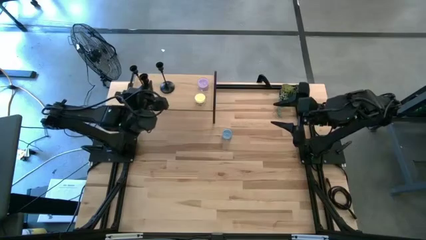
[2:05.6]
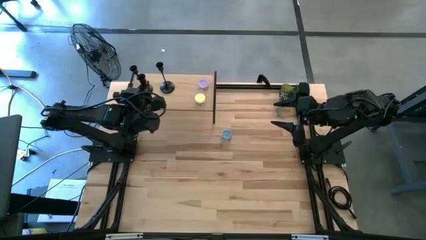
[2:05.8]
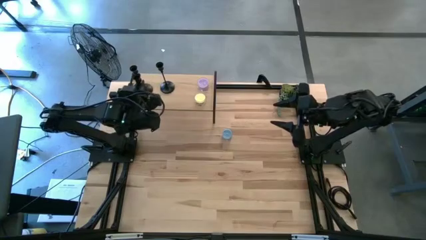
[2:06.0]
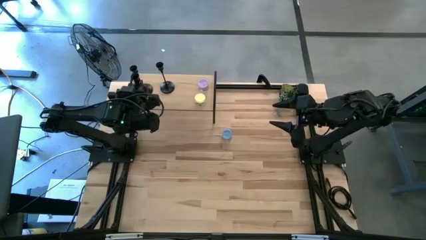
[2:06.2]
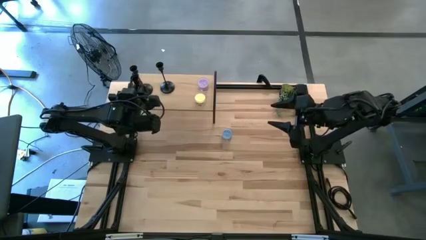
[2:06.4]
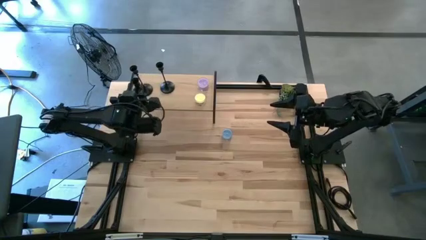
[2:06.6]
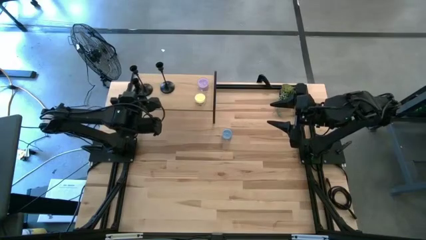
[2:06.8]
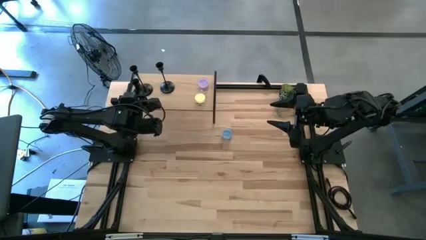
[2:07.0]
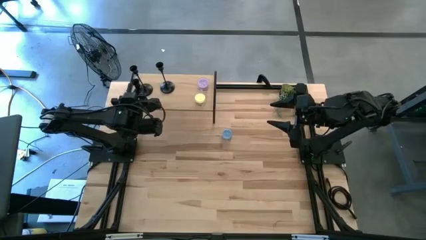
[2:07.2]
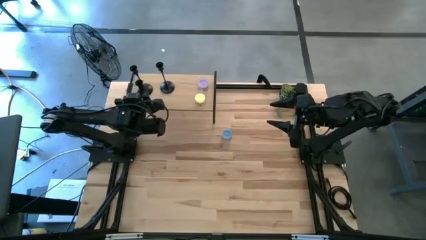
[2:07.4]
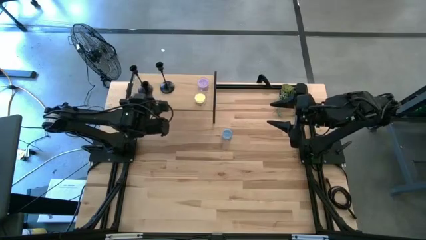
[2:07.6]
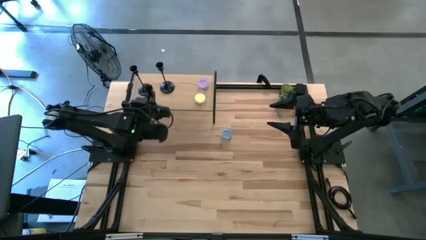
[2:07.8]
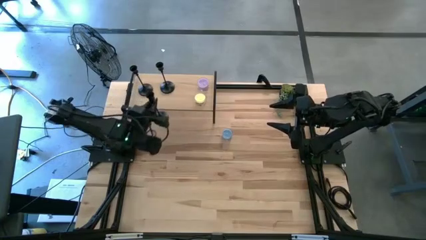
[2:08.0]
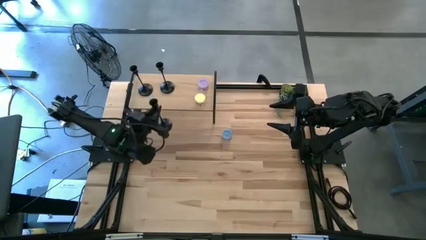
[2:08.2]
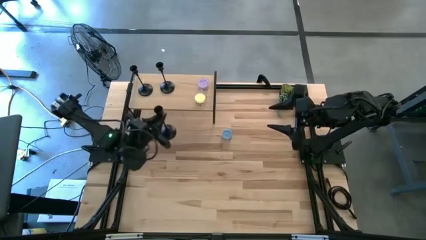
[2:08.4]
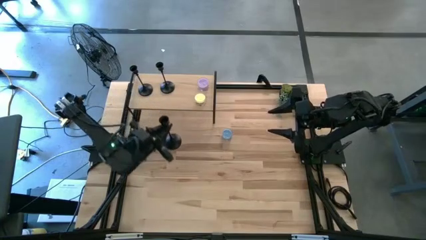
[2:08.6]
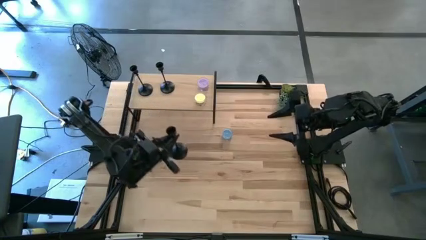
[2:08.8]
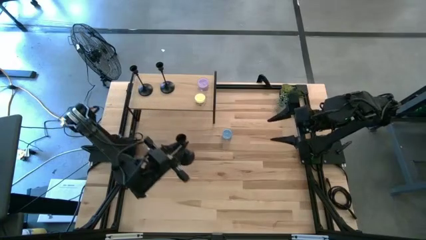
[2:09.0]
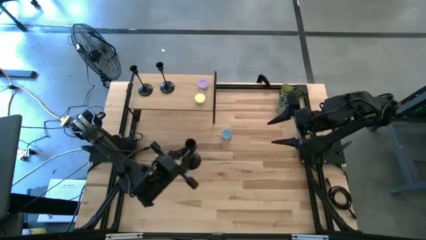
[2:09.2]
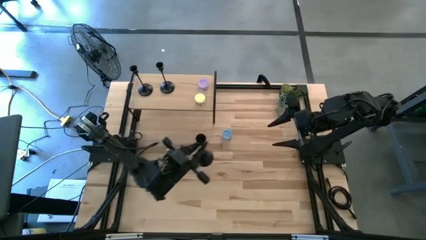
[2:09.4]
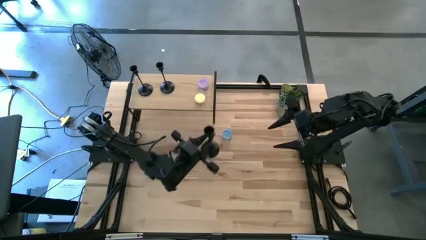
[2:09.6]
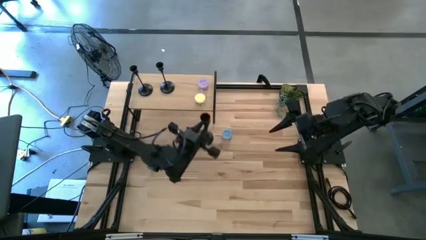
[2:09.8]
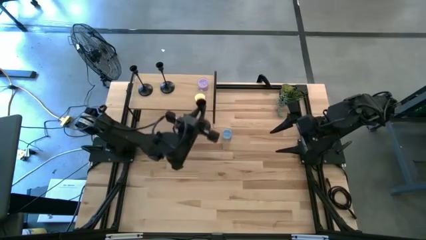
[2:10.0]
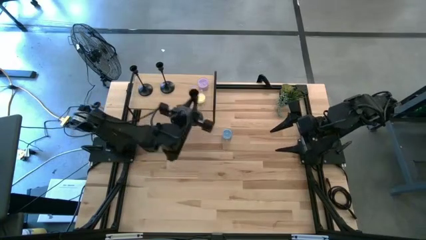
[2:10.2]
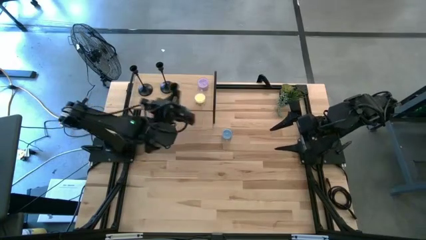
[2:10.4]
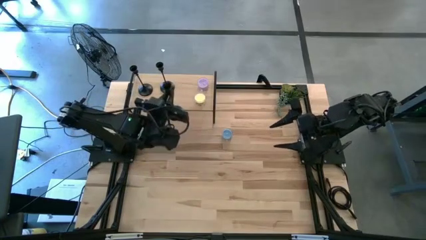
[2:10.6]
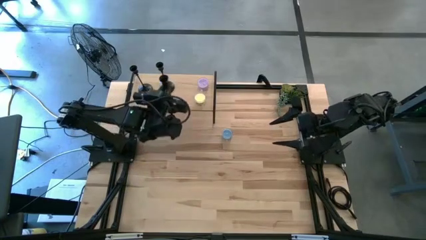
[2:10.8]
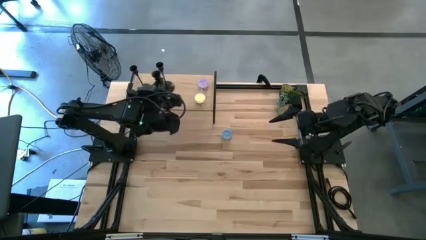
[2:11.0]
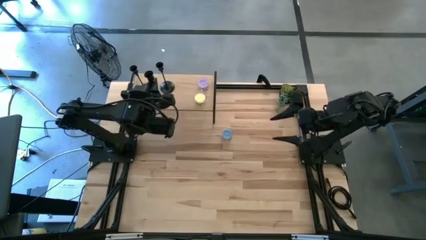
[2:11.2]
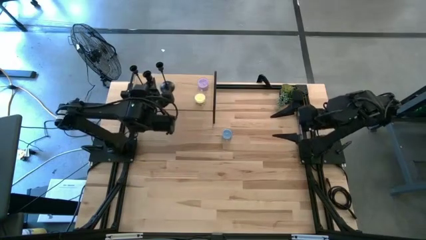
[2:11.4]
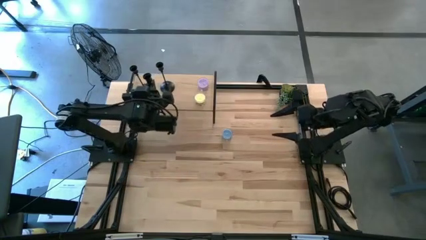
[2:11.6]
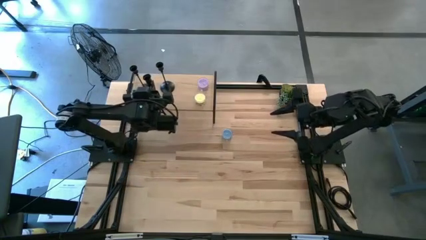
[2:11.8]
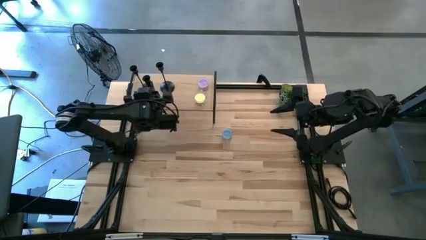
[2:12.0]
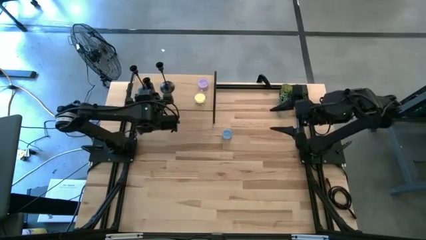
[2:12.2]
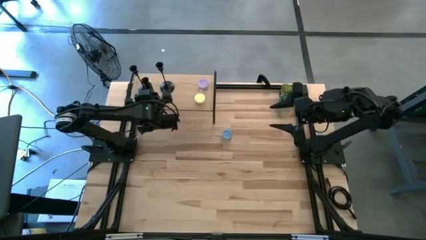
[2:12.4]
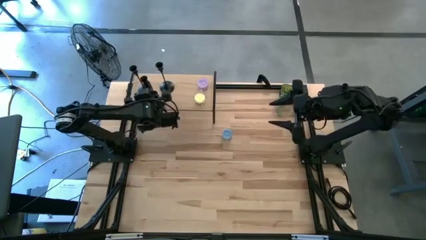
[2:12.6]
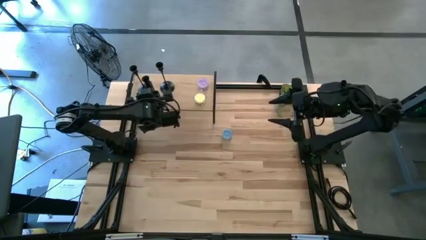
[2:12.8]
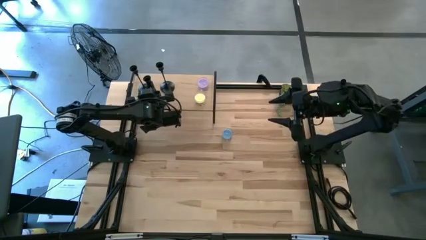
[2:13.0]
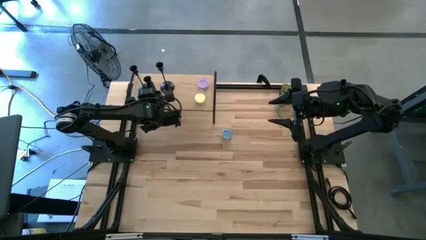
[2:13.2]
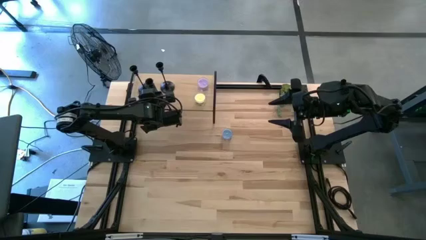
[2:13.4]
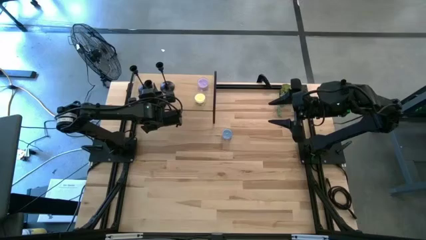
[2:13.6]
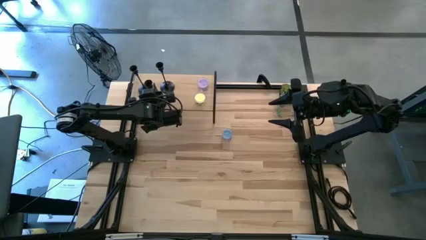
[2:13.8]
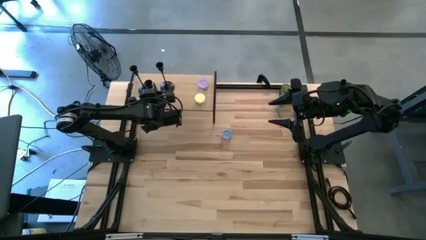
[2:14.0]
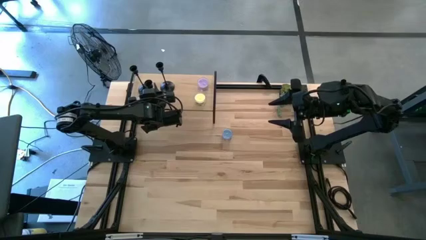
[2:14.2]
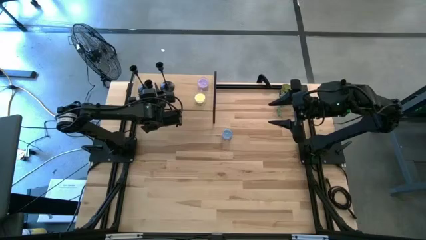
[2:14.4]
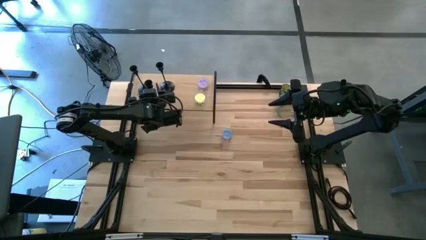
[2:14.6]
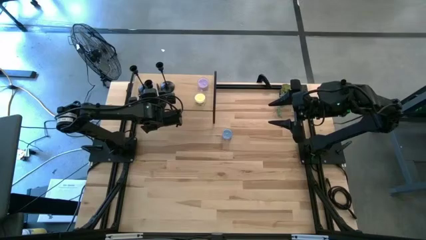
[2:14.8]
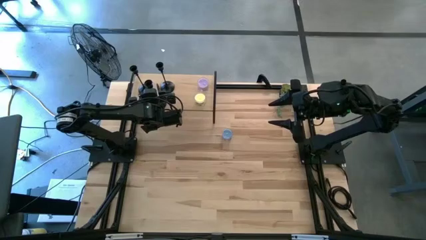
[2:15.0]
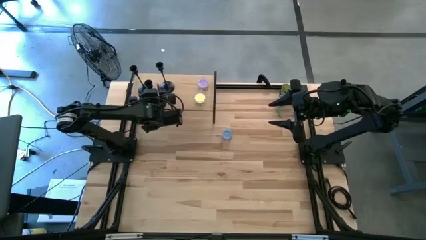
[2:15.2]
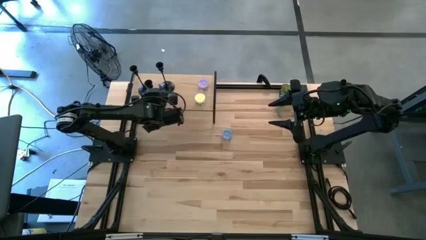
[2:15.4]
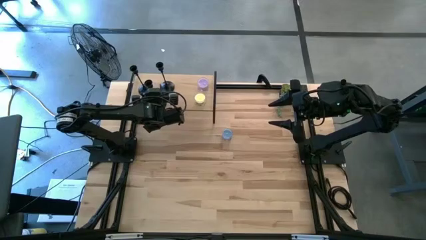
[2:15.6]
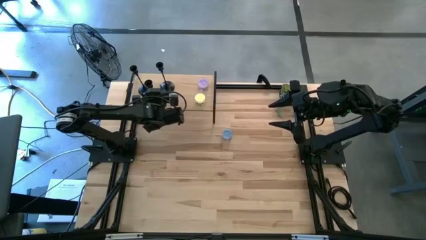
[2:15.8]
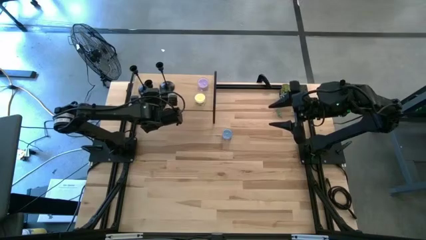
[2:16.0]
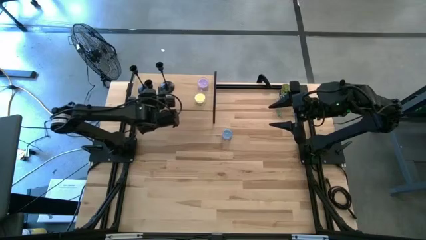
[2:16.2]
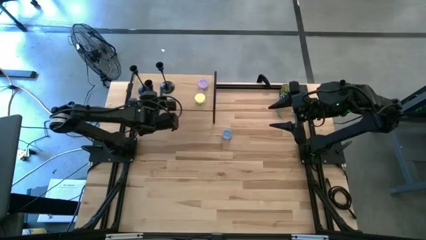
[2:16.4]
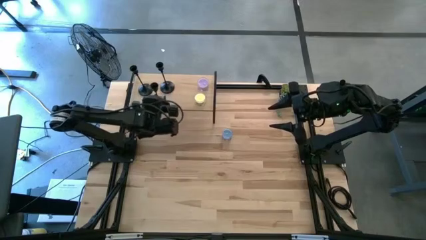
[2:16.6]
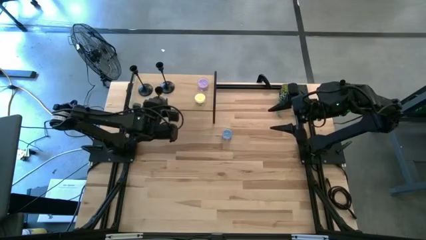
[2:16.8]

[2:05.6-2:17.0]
Task: Pick & Place candle stick holders
Put the black candle holder on the shelf

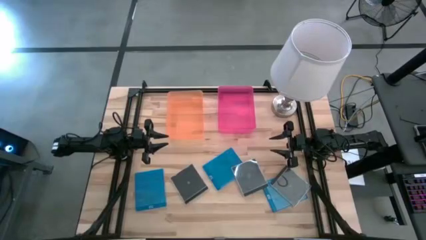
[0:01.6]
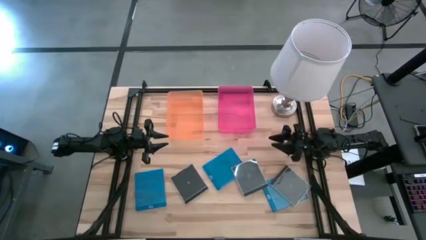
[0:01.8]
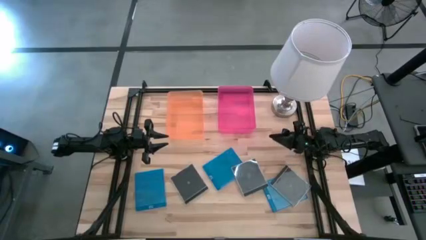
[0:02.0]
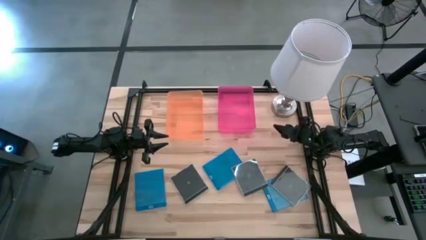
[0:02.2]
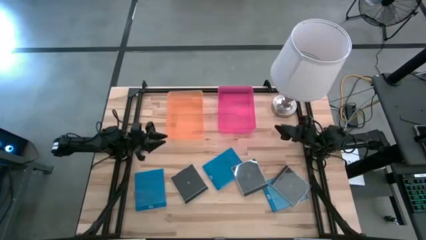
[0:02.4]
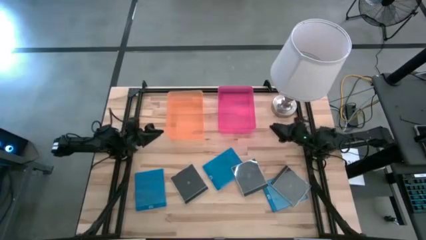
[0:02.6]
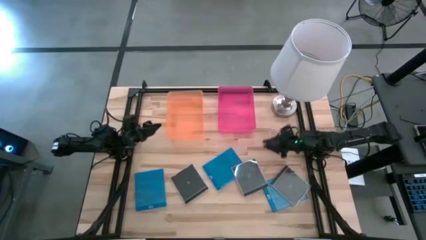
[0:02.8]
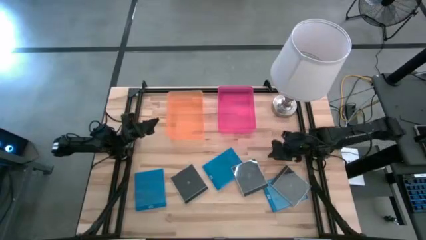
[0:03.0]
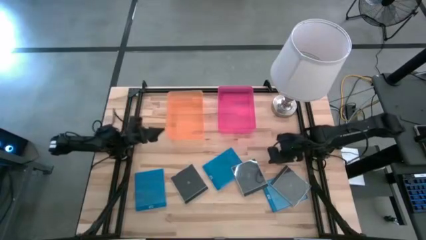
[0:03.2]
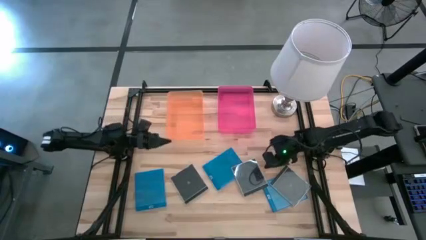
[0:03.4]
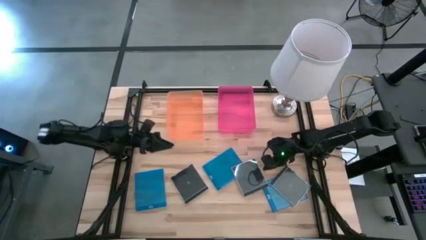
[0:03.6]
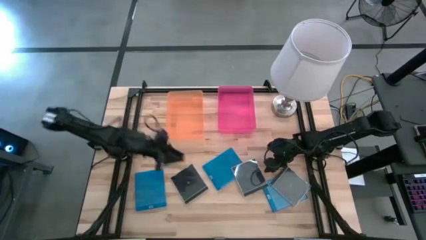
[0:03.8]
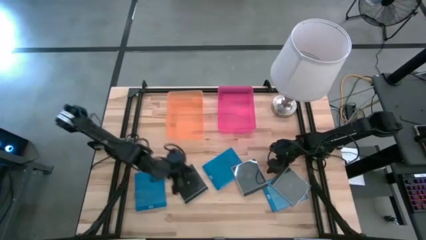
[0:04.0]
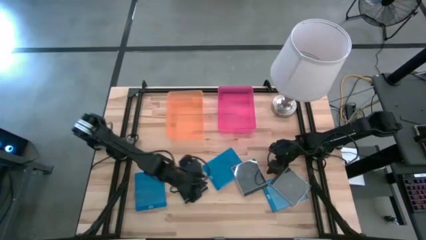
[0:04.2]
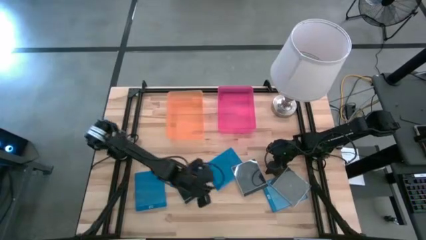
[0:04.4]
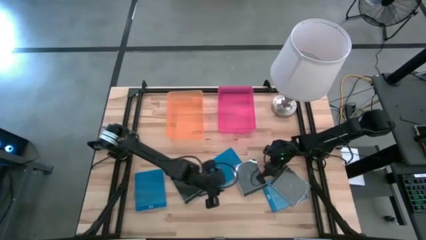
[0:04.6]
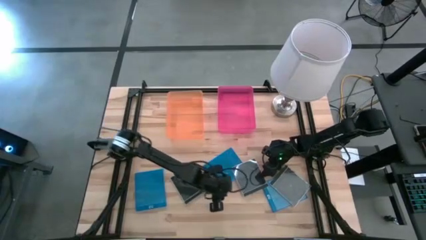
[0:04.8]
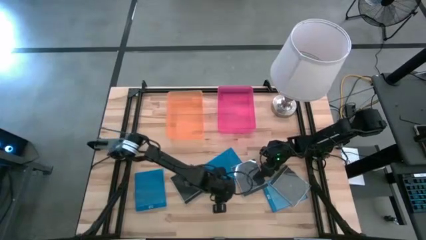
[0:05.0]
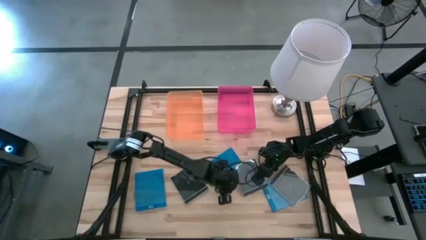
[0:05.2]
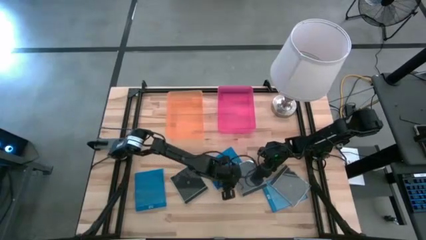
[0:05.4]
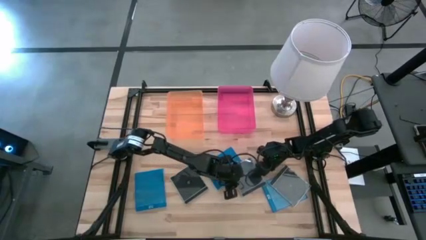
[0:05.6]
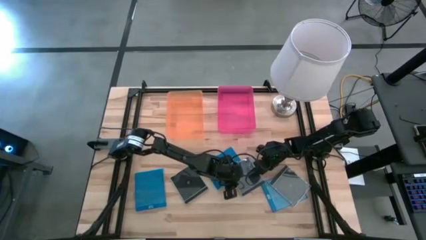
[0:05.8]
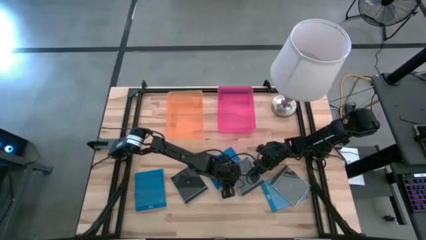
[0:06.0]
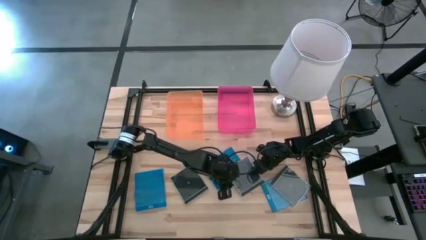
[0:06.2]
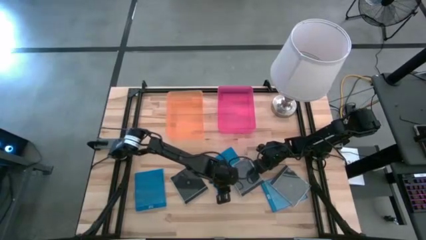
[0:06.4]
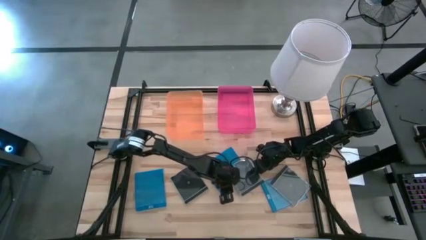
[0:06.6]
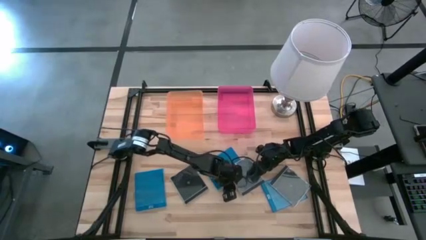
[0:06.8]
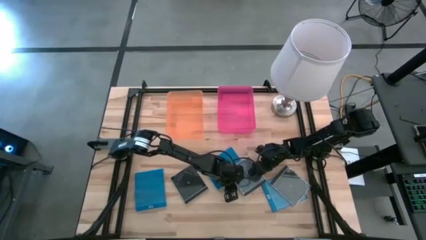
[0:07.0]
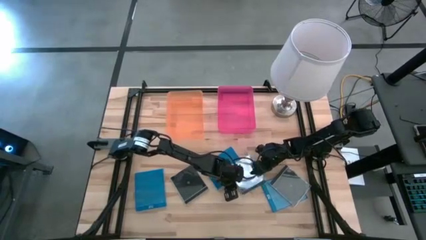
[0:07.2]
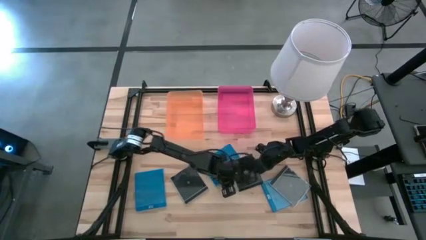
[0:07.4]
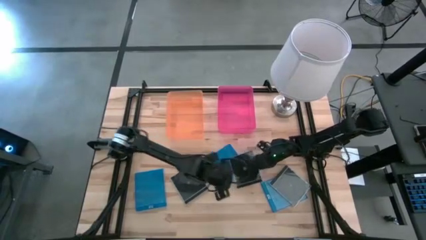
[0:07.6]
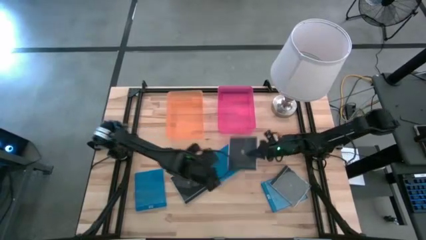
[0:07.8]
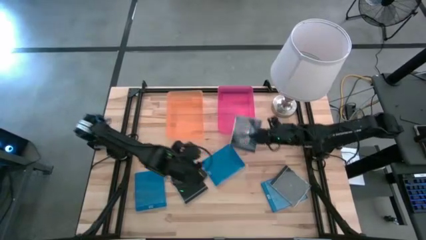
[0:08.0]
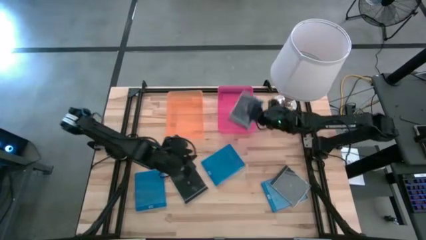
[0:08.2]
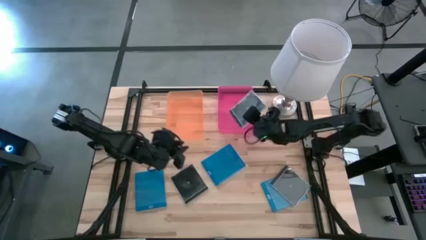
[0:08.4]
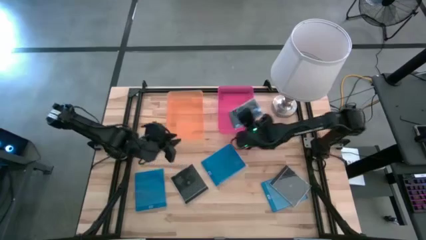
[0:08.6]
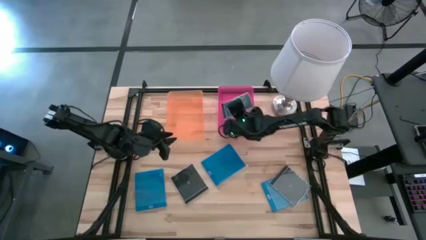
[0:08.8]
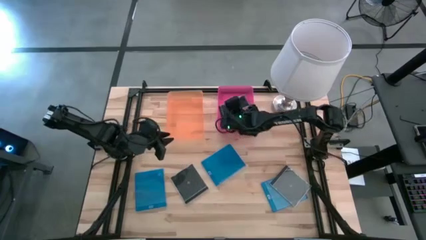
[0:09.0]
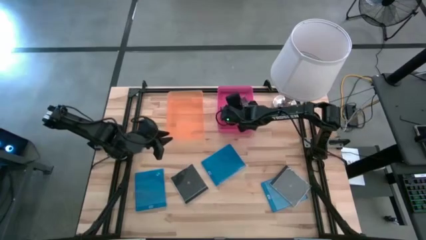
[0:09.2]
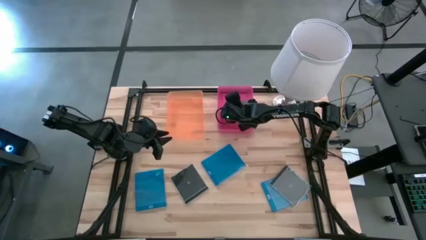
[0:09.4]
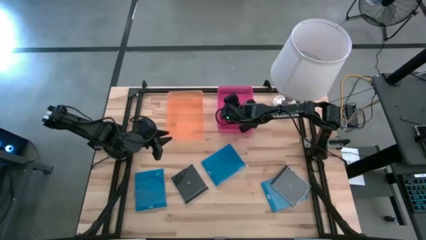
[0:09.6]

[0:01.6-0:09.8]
Task: Pick & place jewel cases by type
Put the center black CD case into the pink bin
